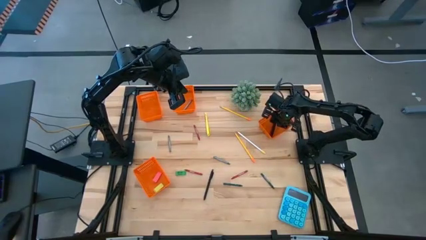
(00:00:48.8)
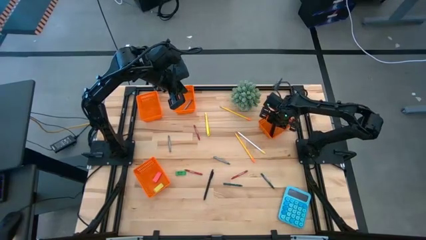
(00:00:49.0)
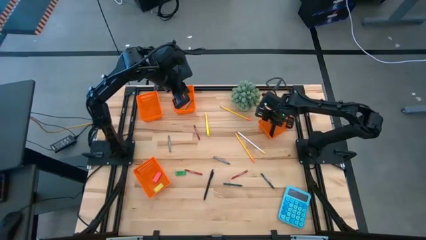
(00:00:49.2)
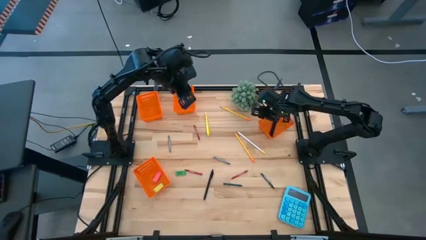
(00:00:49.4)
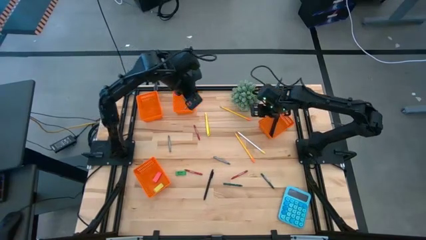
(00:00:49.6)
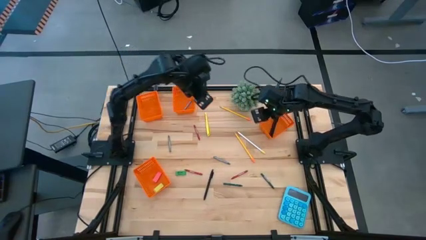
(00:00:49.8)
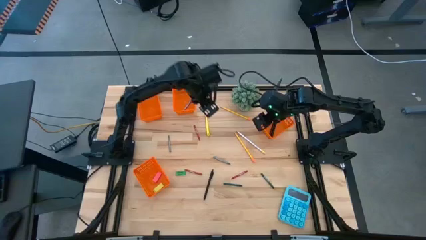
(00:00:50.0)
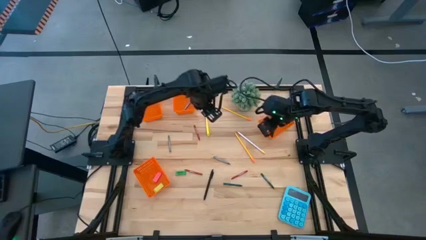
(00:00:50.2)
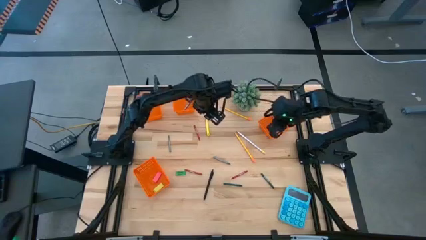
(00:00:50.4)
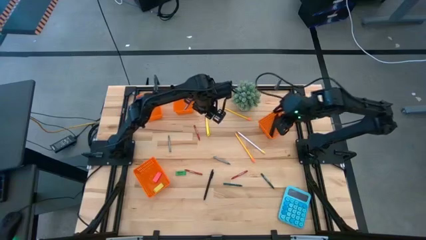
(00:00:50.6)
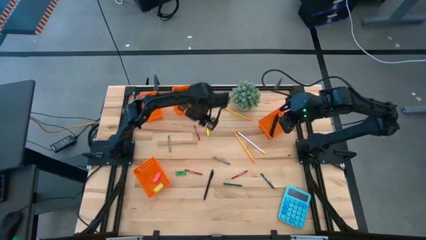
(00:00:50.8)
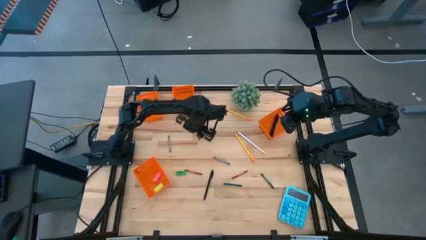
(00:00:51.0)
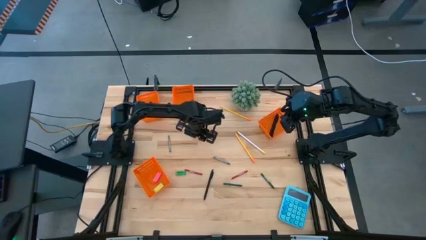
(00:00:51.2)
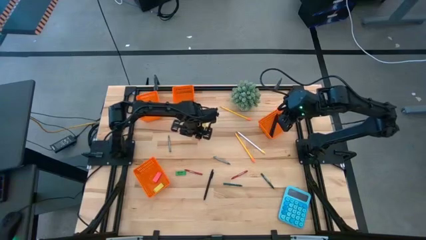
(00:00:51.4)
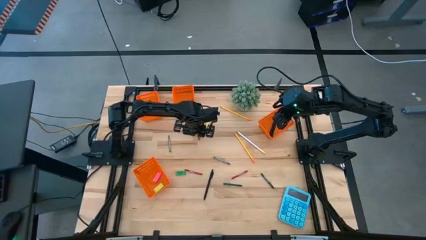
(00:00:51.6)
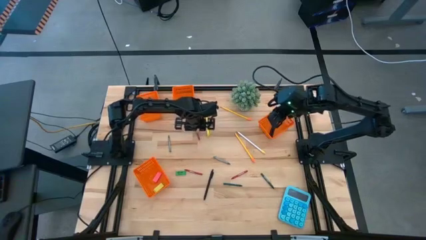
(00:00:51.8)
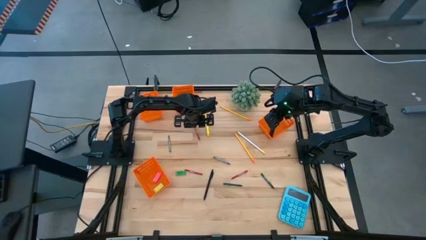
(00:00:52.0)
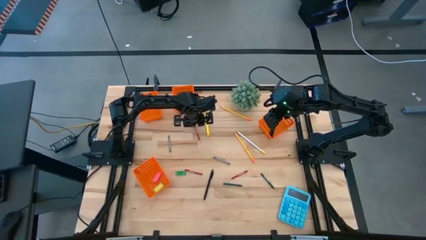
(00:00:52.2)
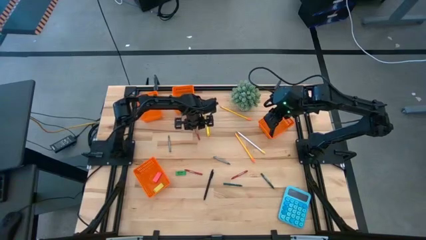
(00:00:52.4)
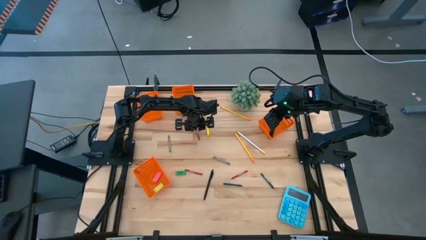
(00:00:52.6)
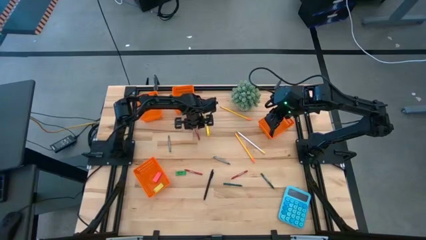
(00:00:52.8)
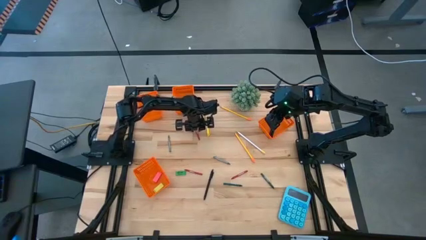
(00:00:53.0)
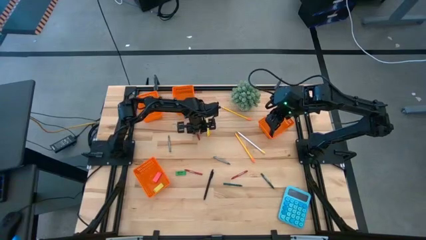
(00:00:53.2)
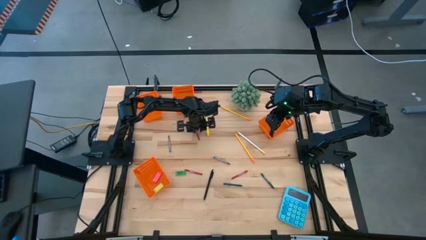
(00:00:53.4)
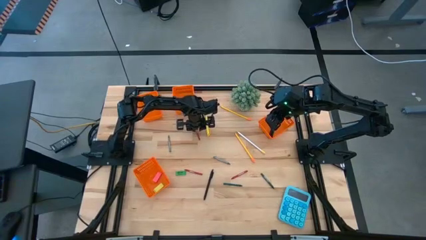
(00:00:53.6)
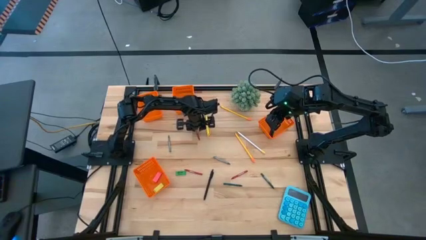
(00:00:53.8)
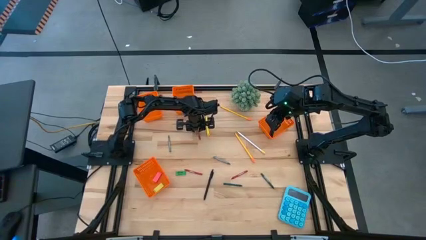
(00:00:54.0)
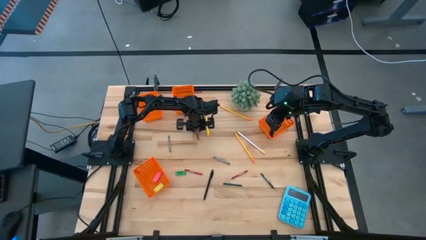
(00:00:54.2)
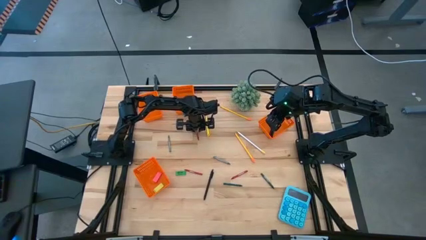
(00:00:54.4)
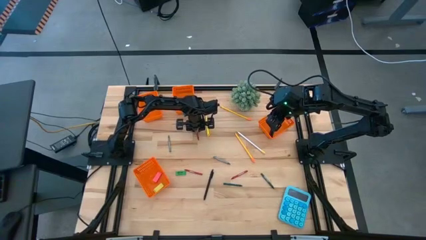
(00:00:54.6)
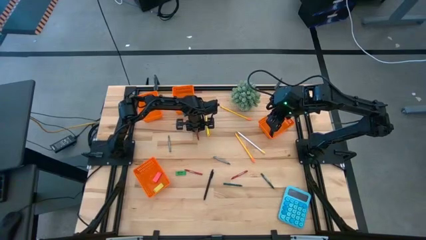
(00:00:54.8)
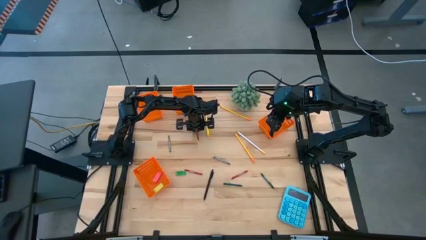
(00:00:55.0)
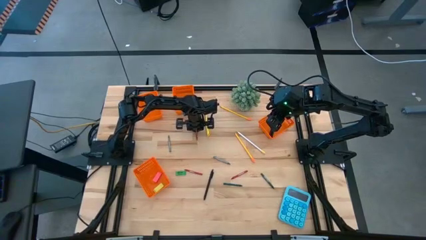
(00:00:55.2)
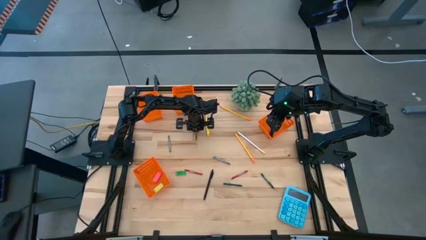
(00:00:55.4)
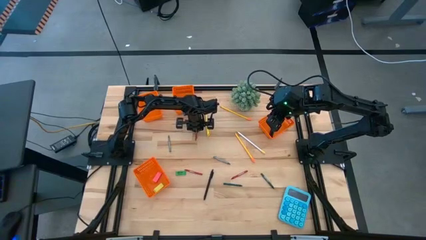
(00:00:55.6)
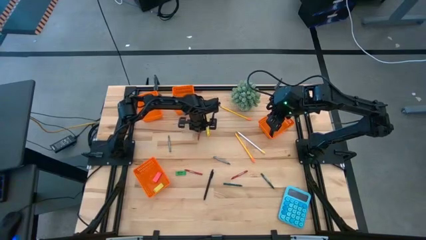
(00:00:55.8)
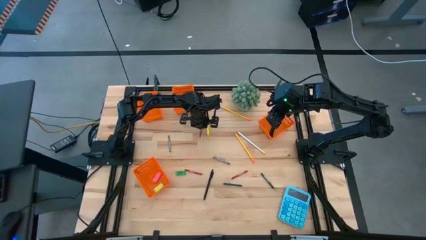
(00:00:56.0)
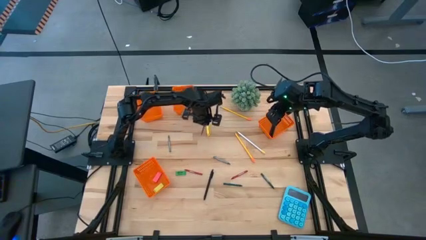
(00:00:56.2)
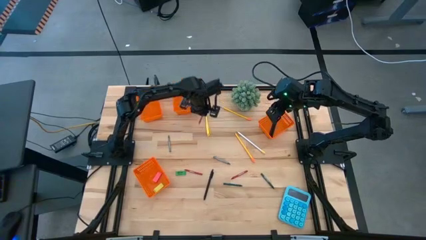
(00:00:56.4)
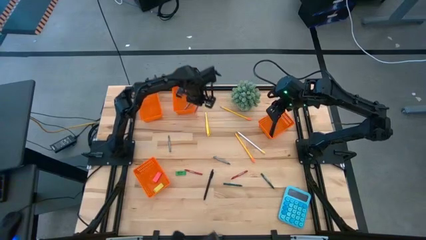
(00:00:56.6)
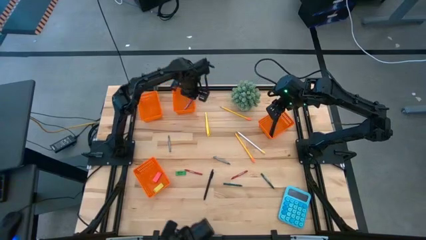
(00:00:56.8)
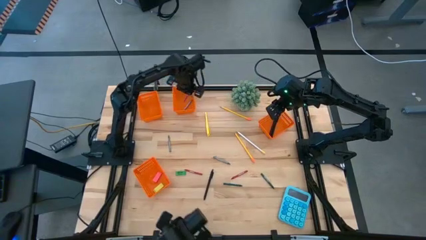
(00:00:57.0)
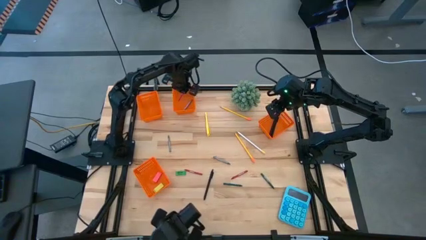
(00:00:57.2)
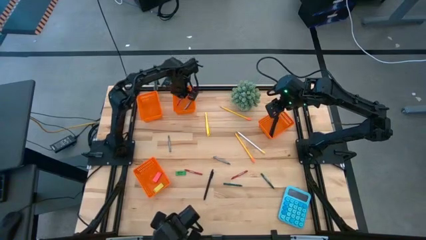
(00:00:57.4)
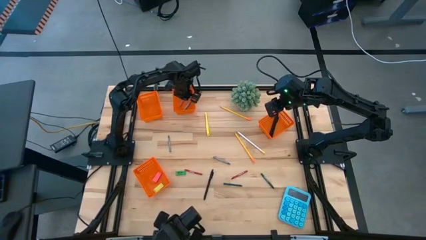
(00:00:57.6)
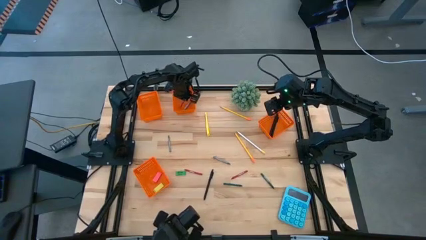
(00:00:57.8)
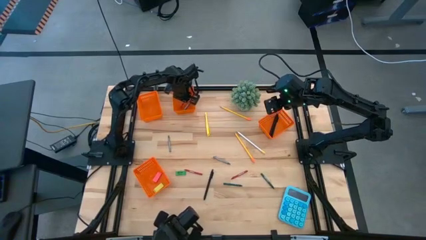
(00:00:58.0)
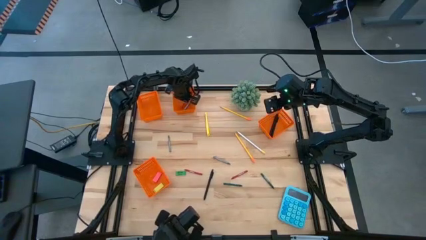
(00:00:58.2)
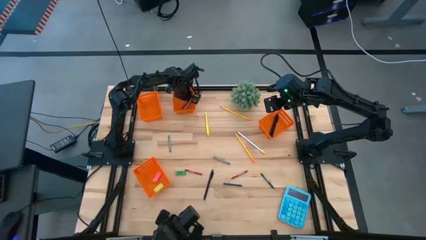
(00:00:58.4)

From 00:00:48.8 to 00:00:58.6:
Task: Sort crayons/erasers/pens/pencils in bins
Put the top red crayon into the middle orange bin

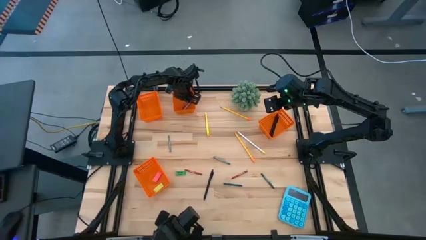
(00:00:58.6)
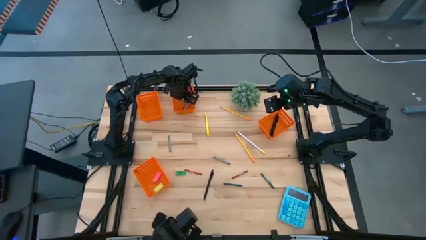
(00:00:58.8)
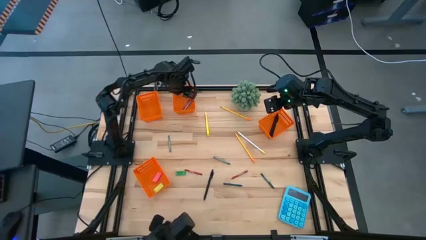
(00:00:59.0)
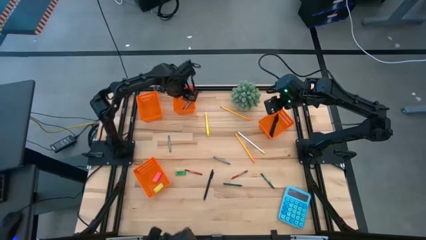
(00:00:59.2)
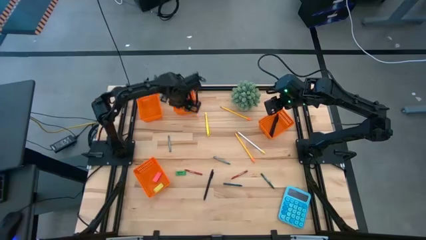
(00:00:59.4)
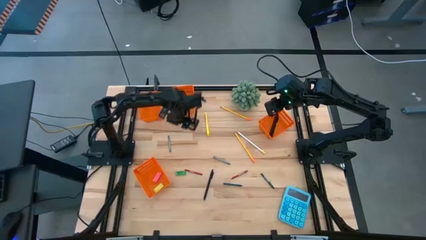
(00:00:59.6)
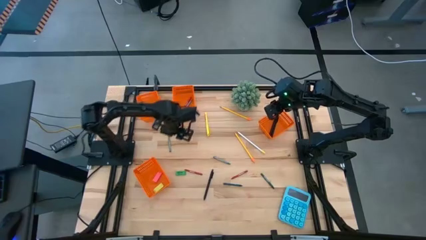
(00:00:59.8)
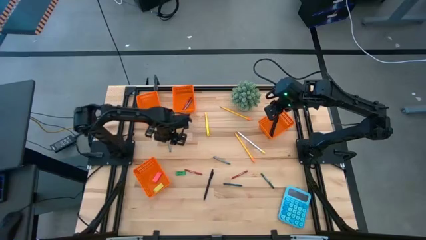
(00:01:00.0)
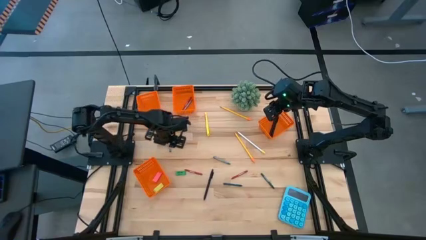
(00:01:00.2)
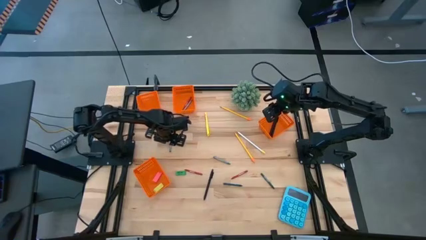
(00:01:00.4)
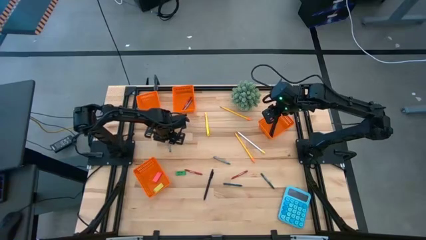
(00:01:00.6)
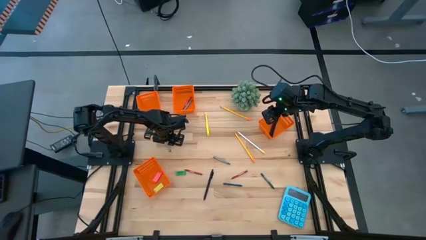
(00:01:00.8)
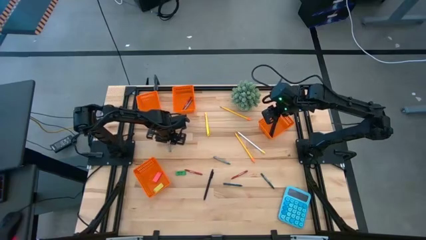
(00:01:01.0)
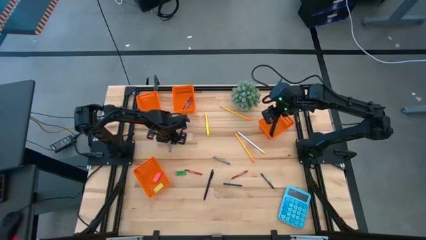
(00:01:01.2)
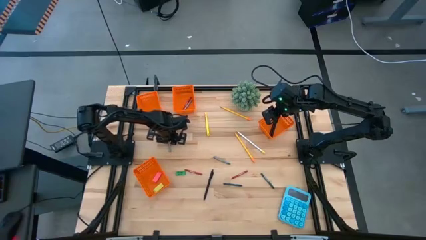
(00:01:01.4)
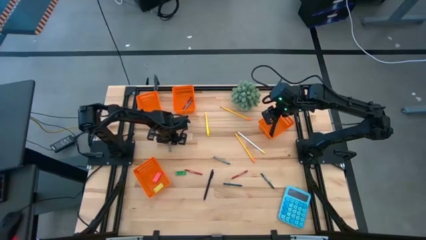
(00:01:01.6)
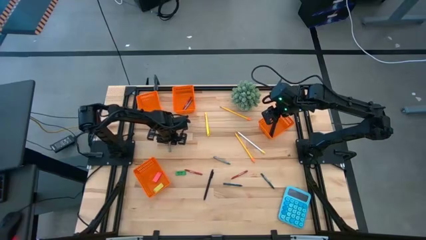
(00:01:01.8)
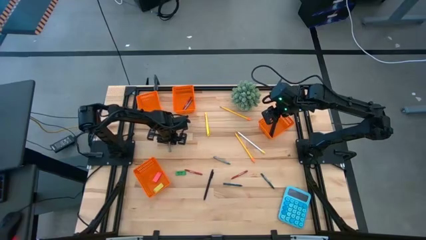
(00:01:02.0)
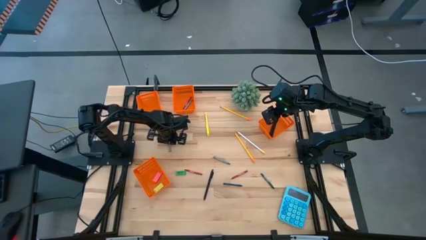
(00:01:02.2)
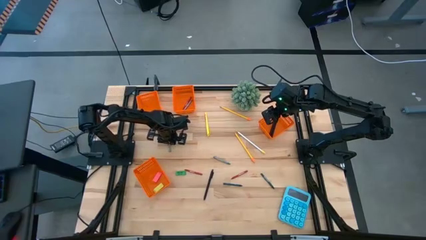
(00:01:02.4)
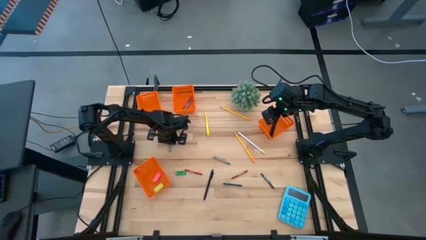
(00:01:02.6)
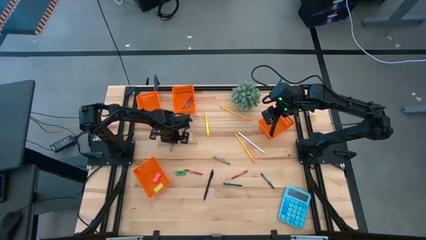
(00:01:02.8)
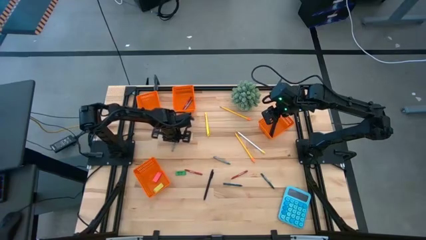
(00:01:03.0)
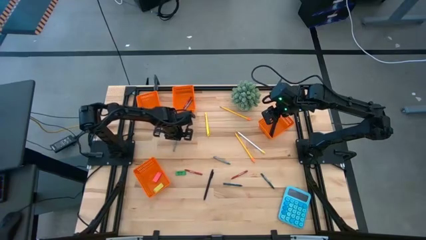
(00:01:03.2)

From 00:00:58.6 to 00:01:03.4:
Put the left gray crayon into the middle orange bin

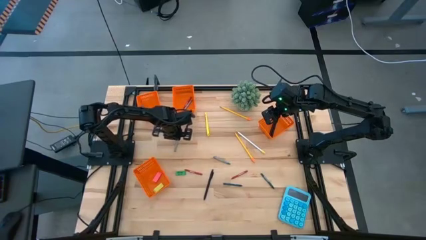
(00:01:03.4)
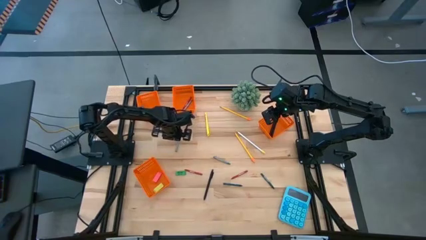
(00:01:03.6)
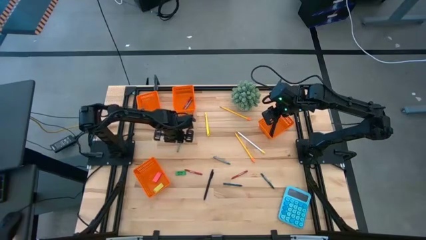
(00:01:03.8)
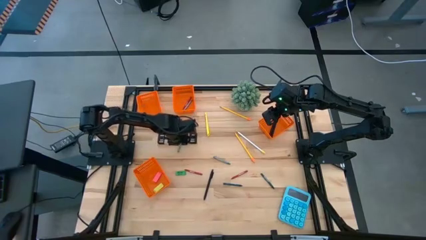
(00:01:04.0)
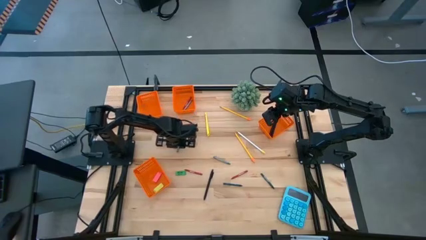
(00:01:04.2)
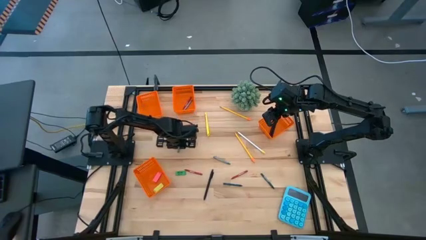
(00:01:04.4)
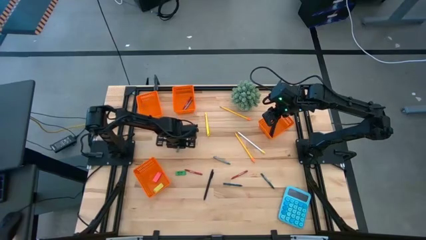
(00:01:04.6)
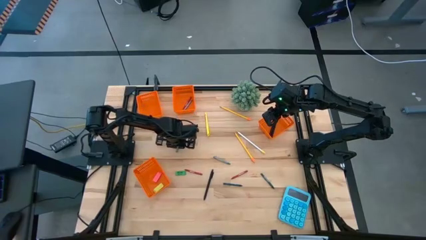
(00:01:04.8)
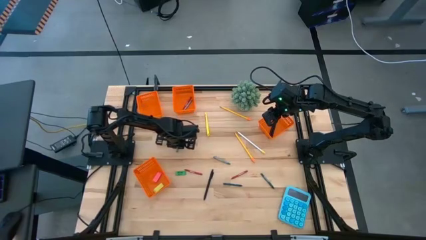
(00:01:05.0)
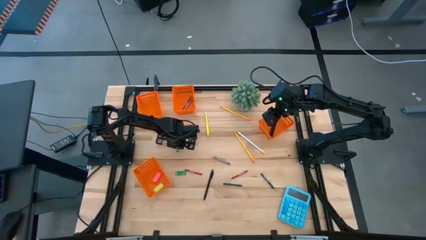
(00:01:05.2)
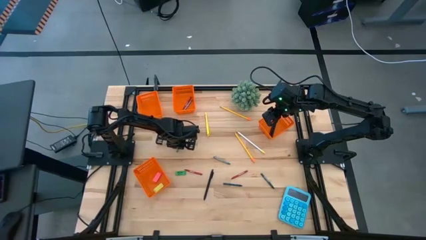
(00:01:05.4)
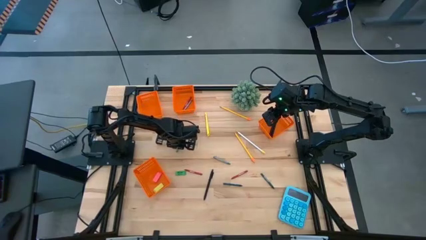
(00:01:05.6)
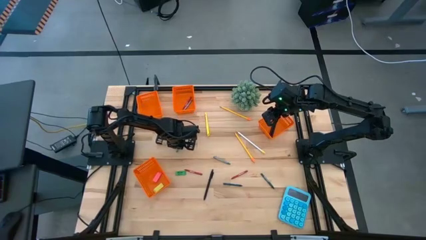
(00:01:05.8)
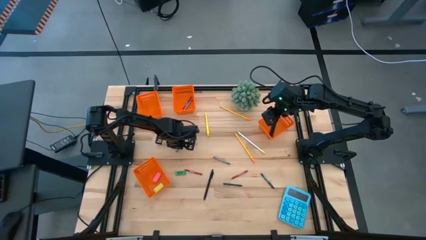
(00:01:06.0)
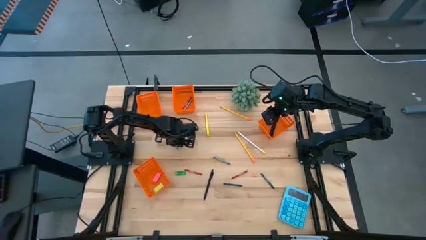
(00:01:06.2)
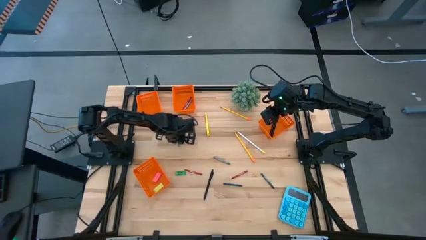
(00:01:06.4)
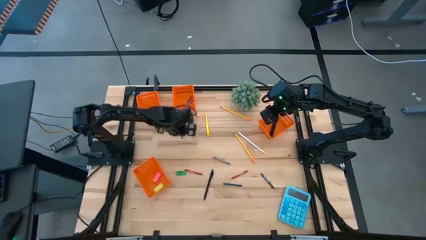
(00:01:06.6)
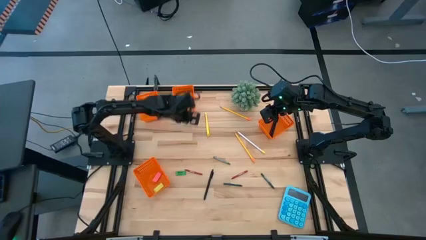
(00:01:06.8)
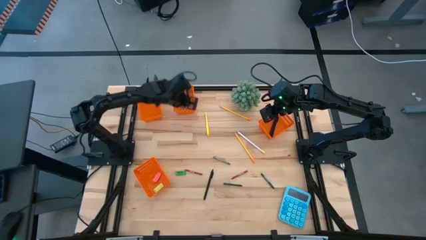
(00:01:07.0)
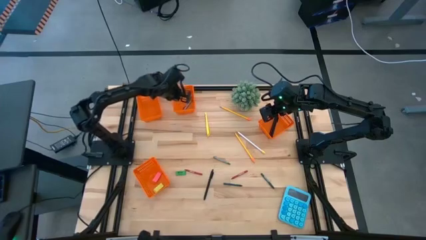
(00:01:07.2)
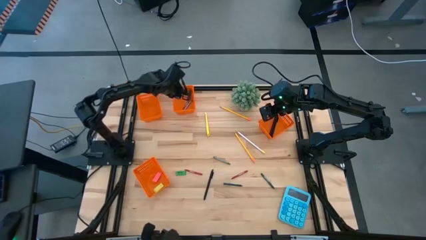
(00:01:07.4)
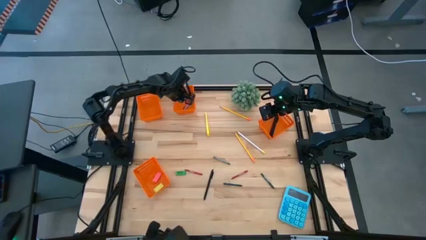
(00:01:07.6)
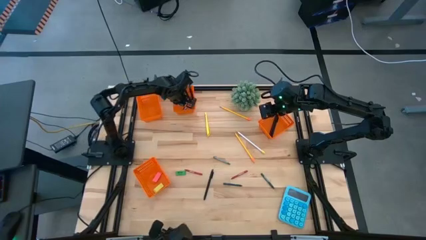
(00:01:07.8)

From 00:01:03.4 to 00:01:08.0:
Put the left gray crayon into the middle orange bin
